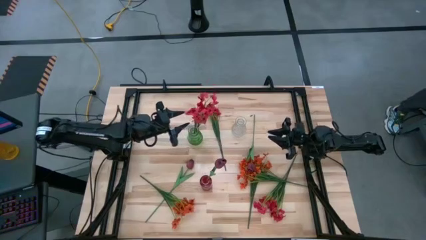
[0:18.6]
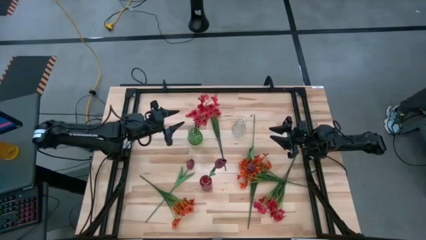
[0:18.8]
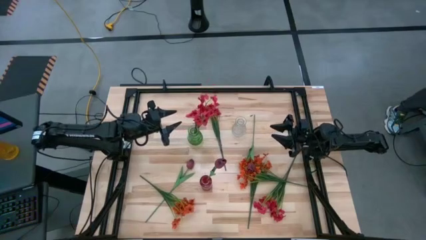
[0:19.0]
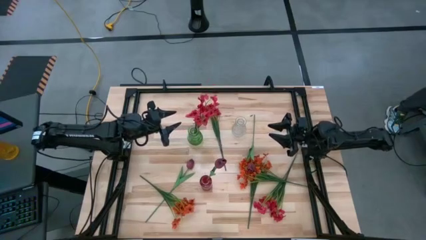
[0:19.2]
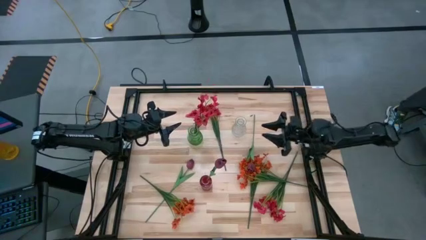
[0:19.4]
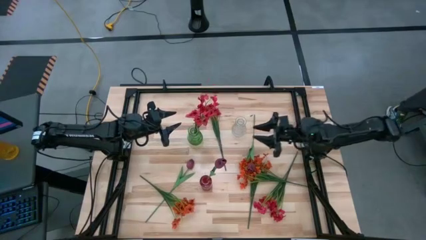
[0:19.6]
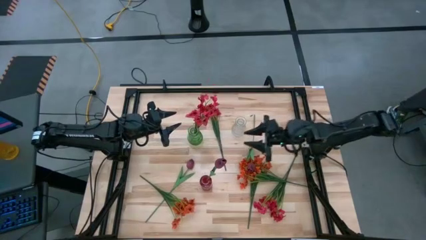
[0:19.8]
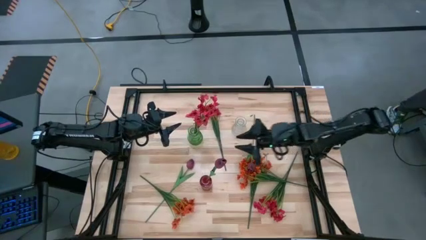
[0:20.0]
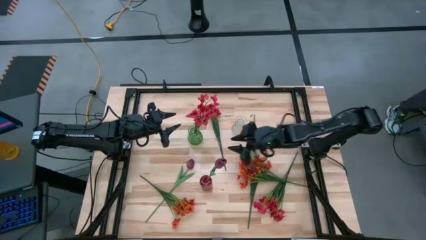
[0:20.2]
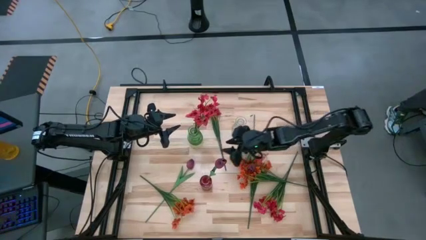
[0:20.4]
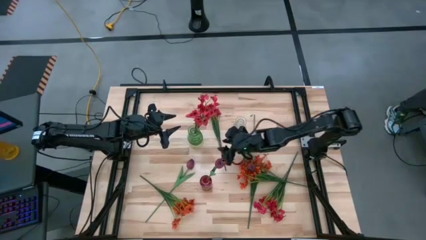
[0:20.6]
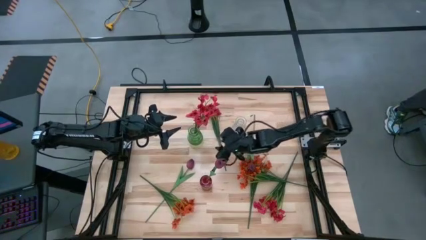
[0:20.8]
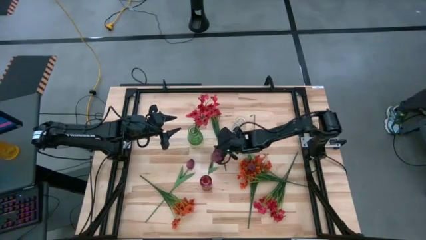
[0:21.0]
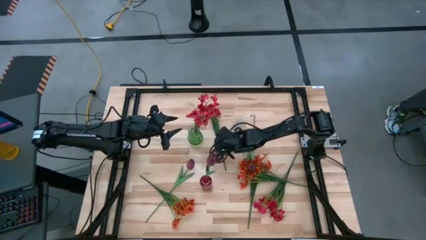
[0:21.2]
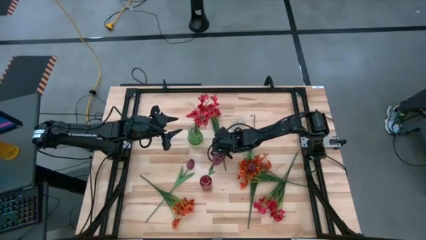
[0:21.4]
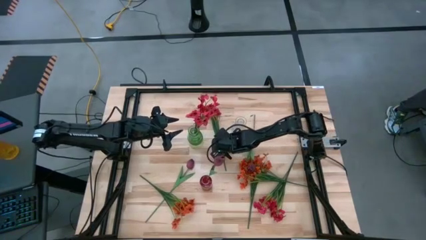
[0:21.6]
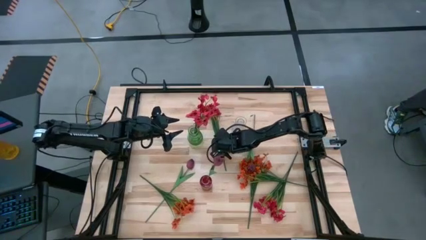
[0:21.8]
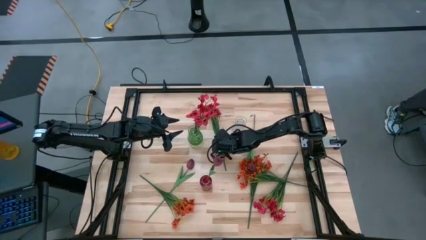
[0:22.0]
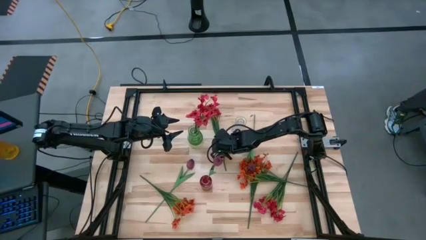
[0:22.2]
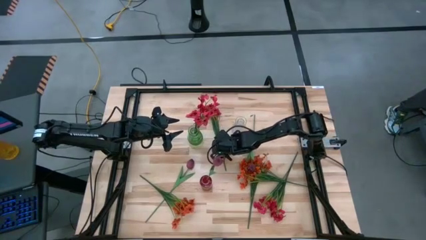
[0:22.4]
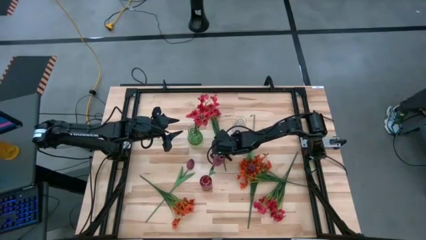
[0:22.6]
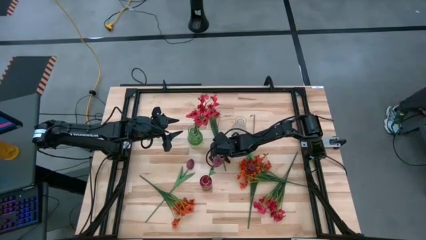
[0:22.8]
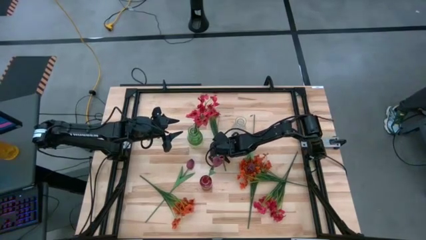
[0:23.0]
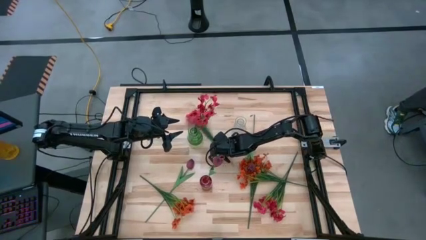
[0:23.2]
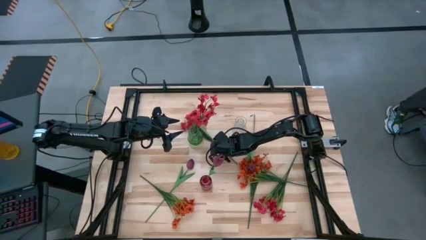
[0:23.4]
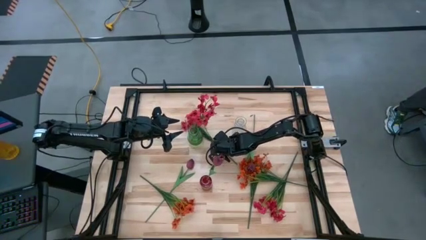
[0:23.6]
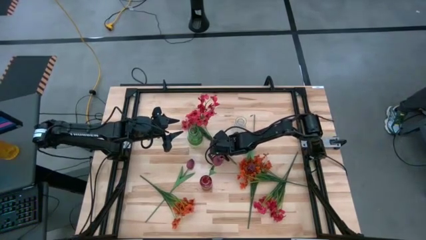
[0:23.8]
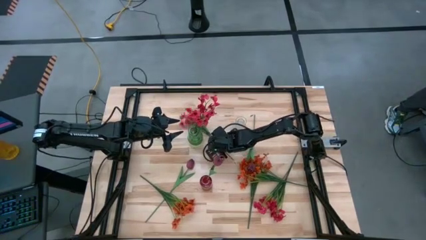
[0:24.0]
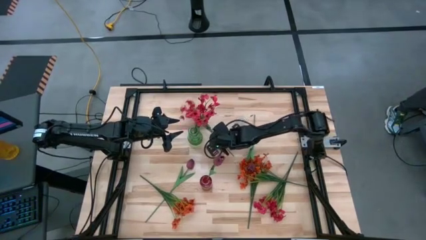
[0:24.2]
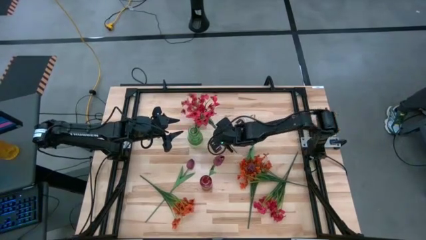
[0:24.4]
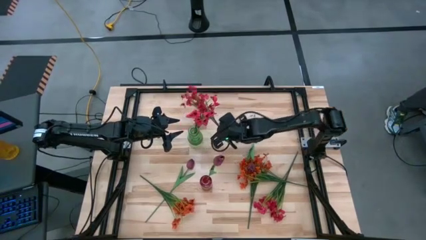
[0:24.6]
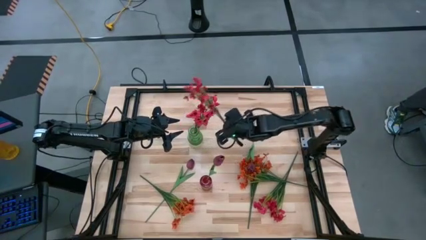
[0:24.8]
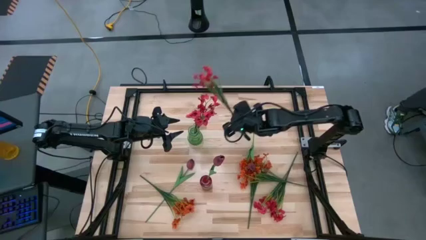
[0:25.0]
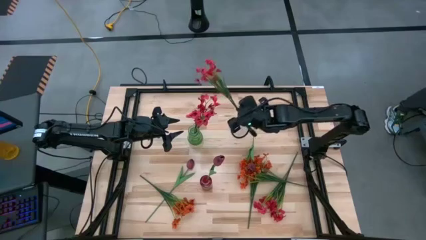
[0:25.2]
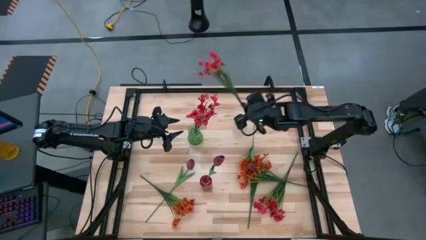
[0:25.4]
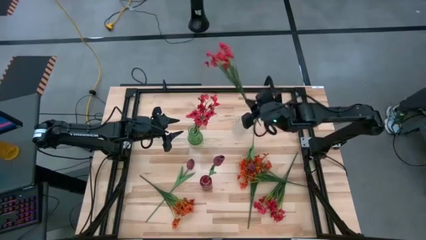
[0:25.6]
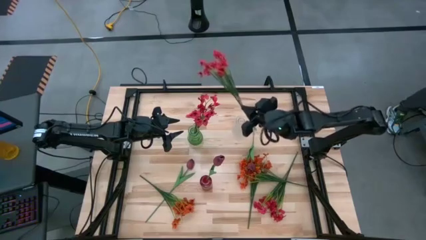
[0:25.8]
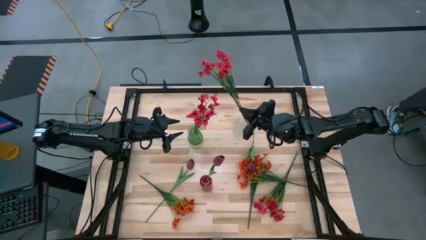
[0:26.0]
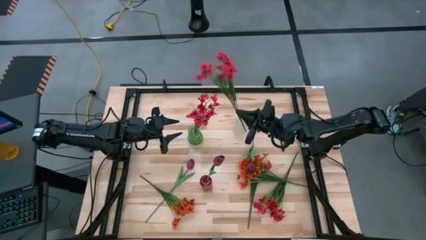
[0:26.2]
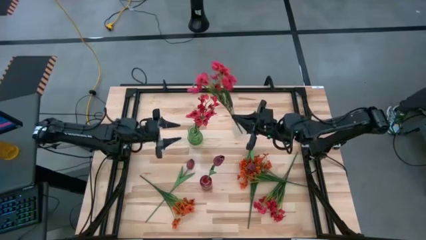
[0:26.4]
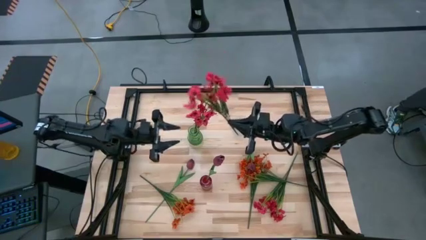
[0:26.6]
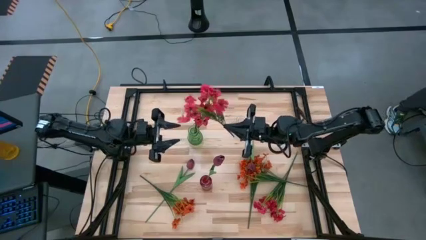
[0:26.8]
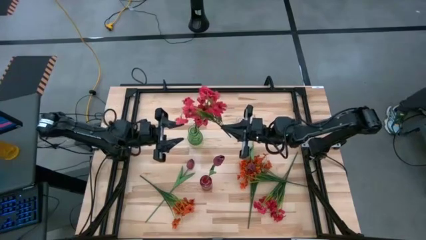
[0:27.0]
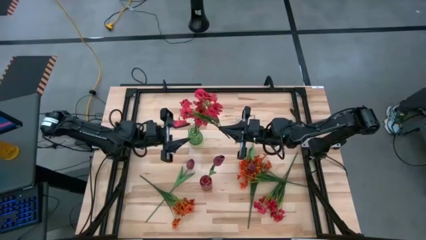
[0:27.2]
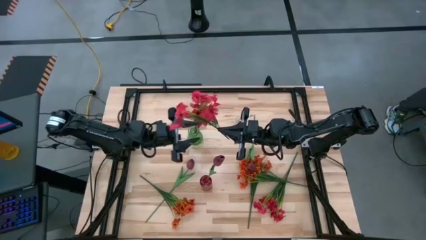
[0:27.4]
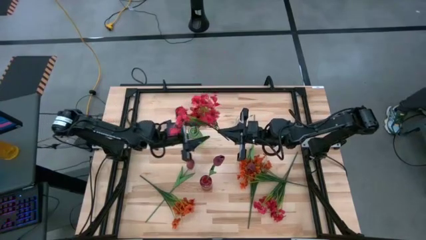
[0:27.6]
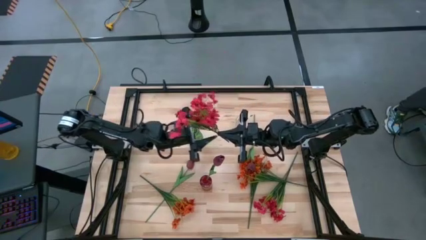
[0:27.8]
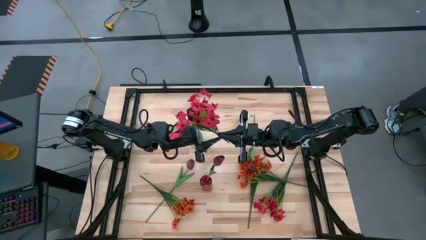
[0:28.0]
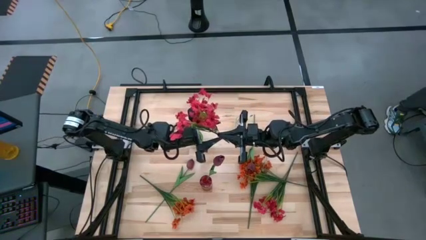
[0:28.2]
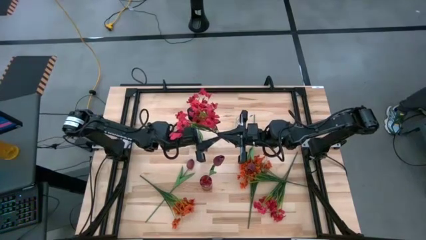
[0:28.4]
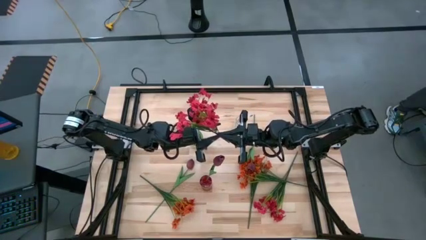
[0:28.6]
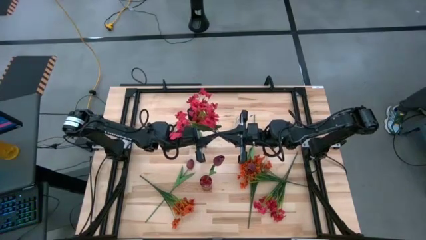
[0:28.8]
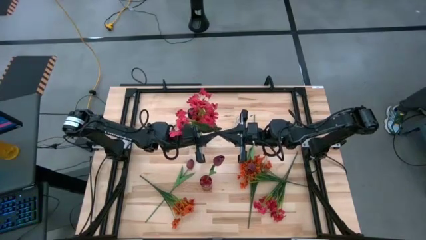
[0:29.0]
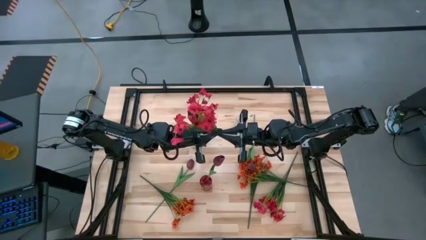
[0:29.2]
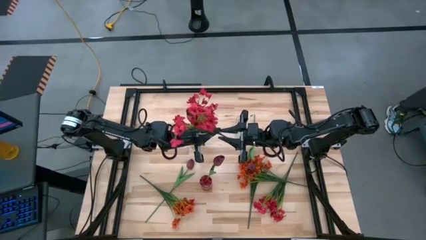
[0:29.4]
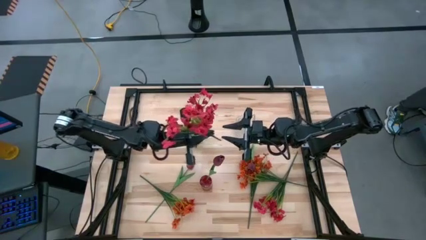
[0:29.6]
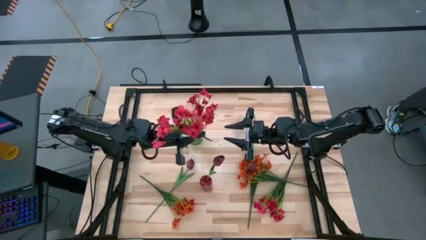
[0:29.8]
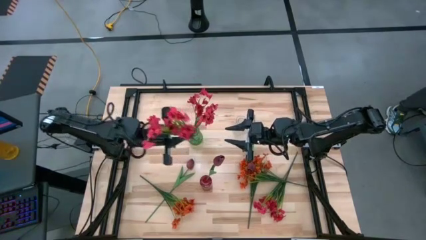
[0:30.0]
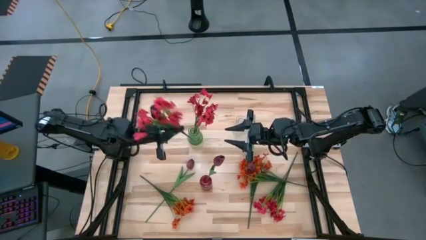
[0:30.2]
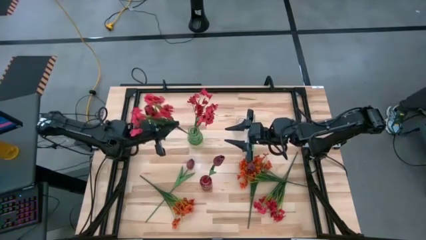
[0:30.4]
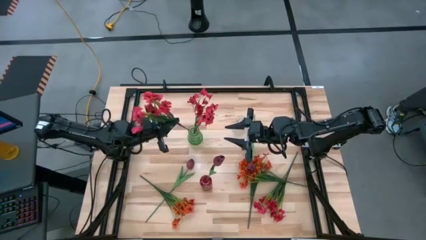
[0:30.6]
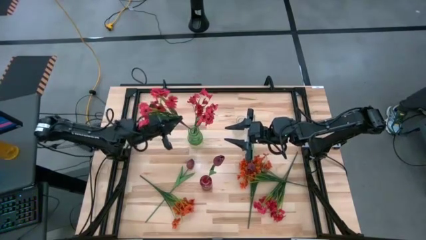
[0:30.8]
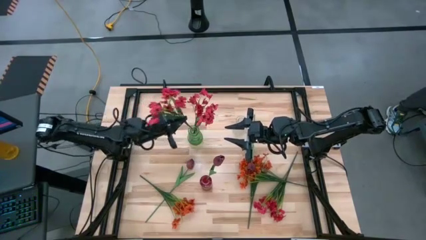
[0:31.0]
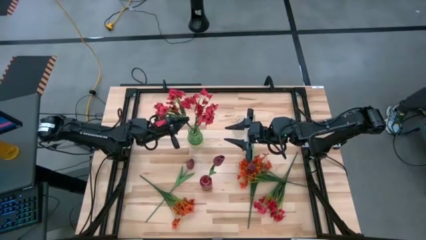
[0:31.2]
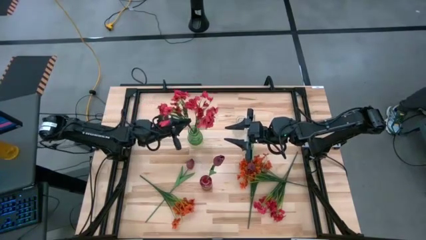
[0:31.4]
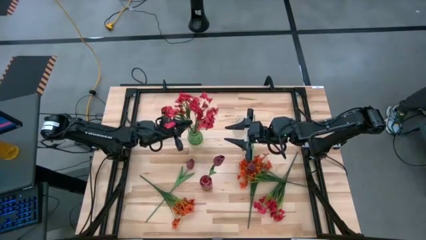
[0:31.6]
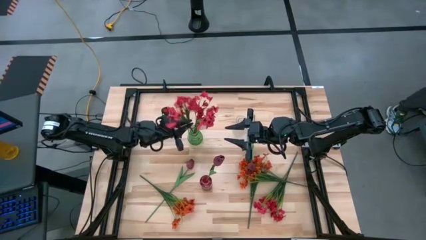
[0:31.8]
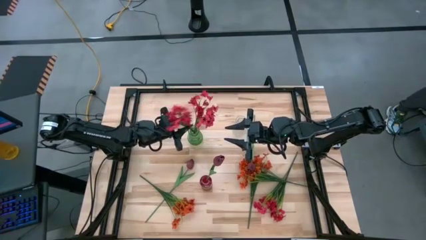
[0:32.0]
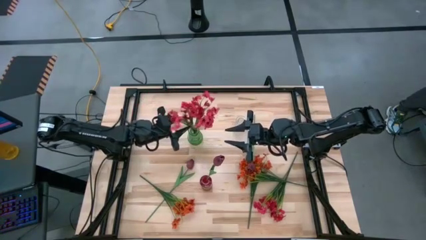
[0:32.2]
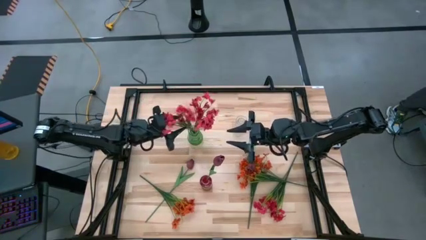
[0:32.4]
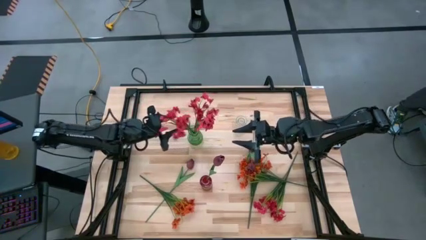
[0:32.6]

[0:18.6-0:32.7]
Task: Sort flowers into vase by color
Put the top pink flowers into the green vase
